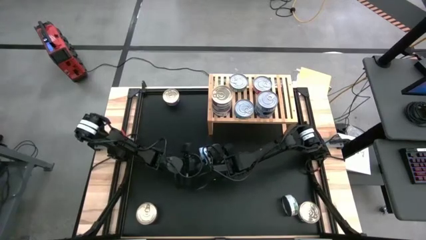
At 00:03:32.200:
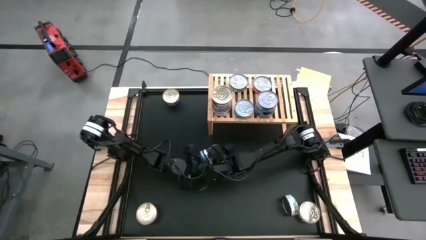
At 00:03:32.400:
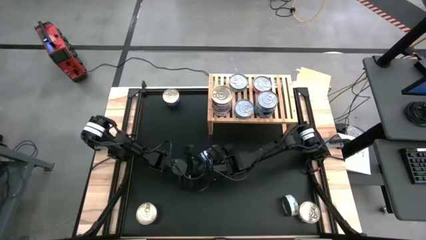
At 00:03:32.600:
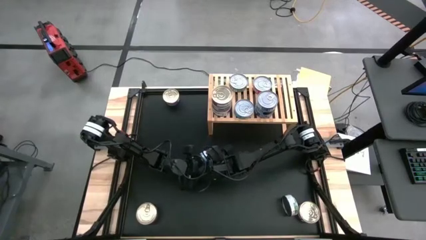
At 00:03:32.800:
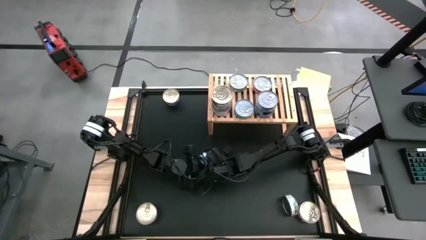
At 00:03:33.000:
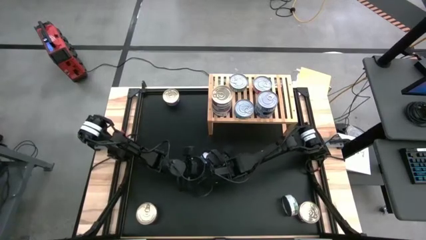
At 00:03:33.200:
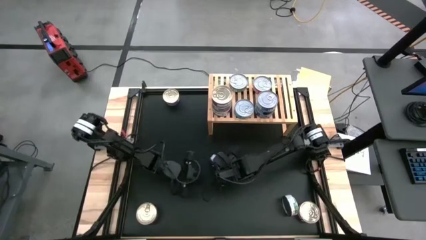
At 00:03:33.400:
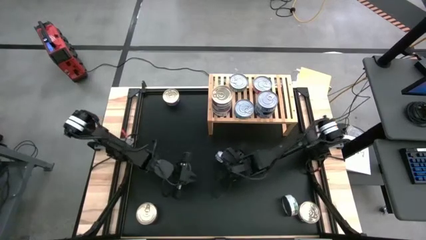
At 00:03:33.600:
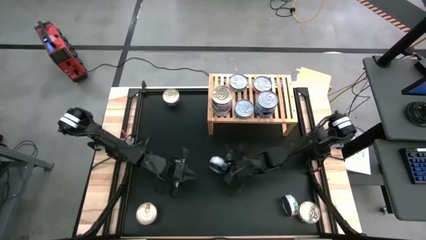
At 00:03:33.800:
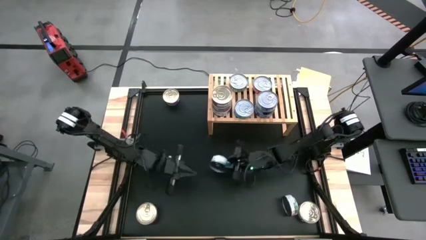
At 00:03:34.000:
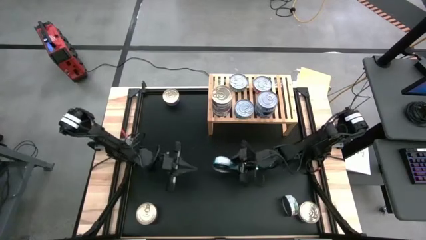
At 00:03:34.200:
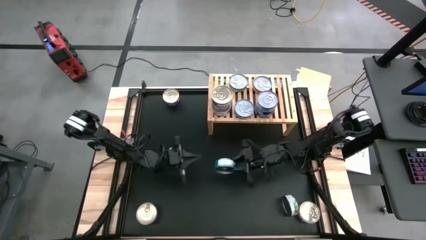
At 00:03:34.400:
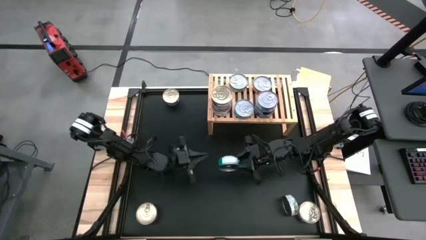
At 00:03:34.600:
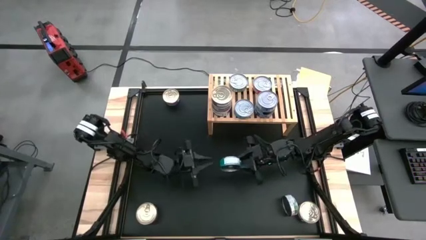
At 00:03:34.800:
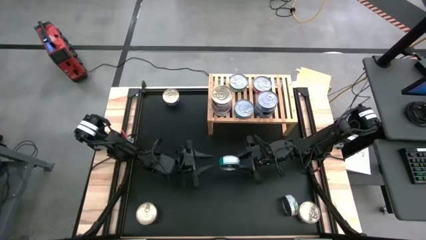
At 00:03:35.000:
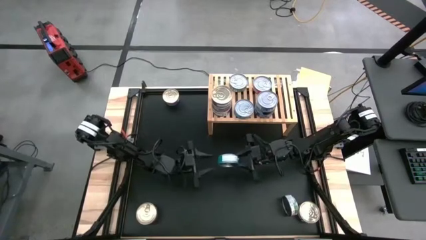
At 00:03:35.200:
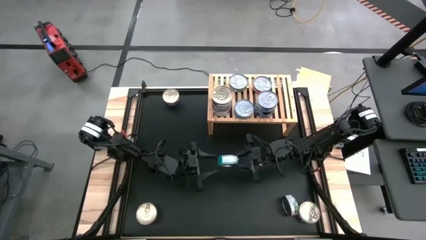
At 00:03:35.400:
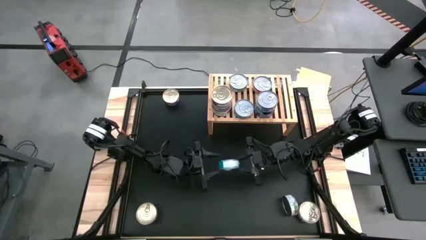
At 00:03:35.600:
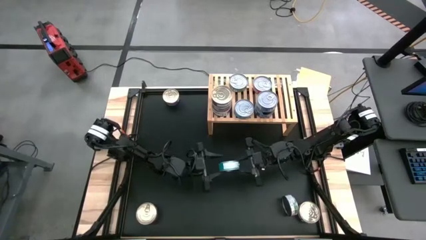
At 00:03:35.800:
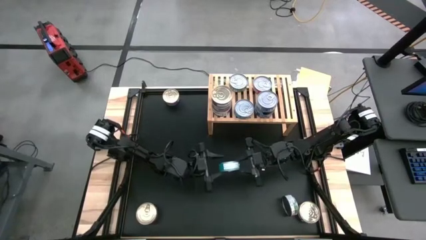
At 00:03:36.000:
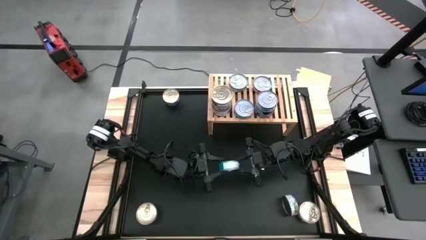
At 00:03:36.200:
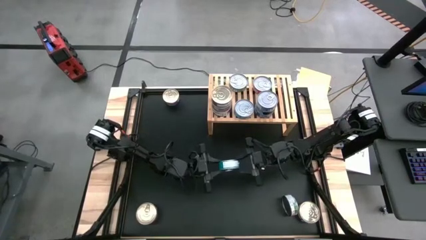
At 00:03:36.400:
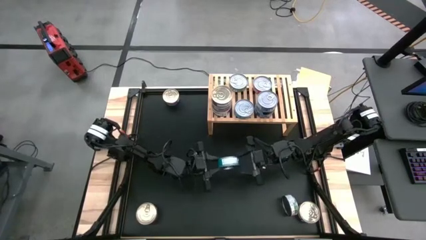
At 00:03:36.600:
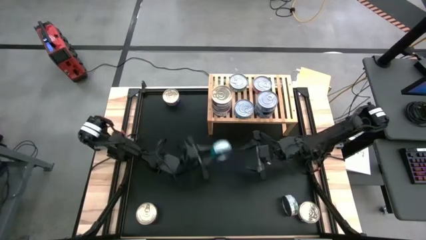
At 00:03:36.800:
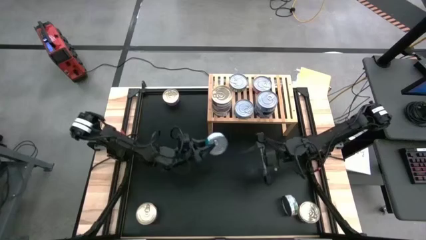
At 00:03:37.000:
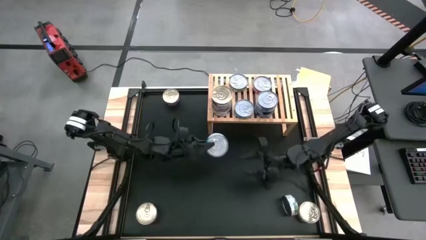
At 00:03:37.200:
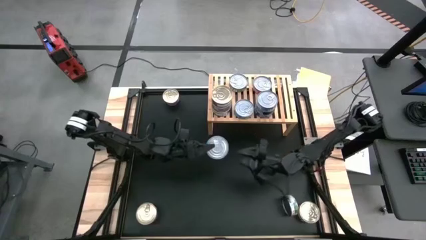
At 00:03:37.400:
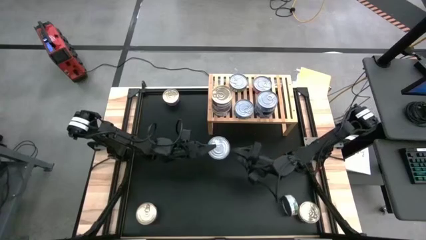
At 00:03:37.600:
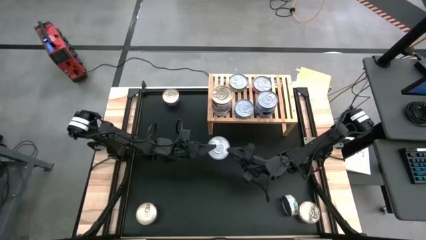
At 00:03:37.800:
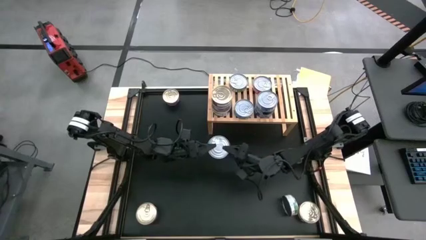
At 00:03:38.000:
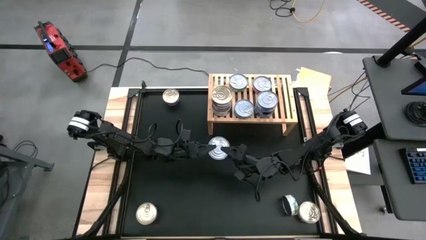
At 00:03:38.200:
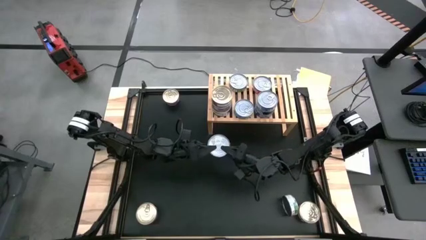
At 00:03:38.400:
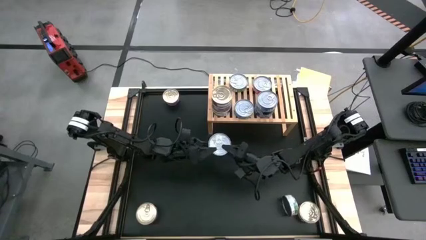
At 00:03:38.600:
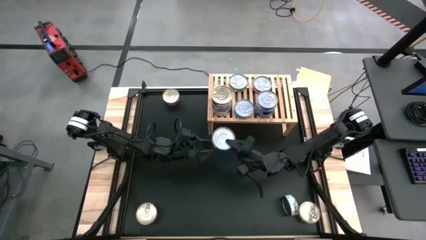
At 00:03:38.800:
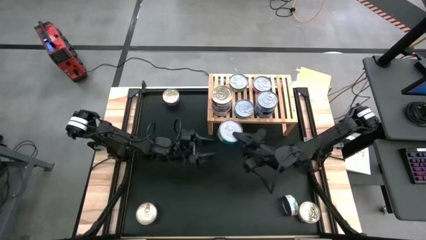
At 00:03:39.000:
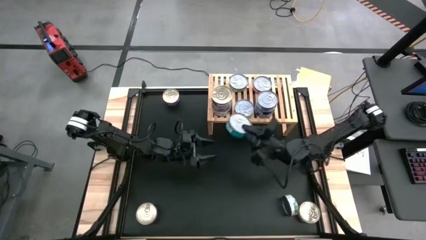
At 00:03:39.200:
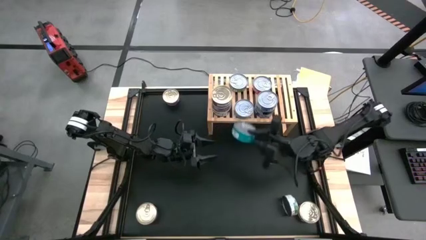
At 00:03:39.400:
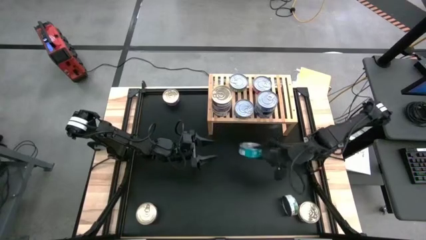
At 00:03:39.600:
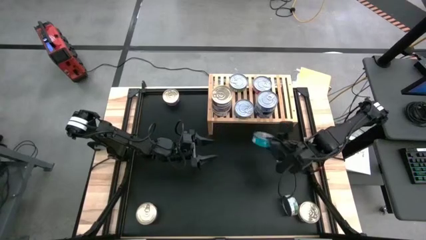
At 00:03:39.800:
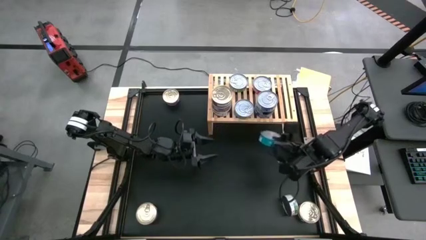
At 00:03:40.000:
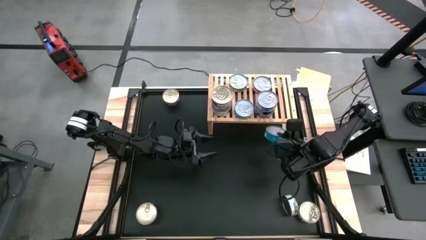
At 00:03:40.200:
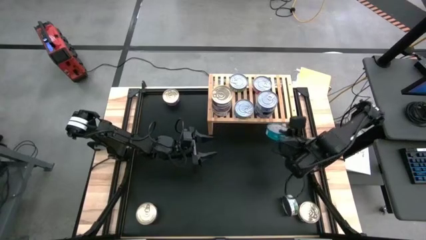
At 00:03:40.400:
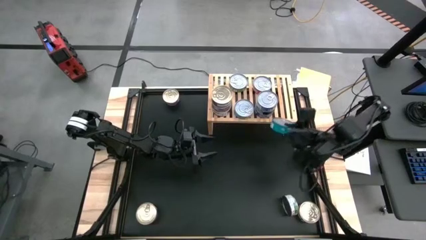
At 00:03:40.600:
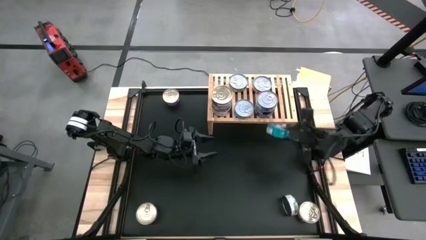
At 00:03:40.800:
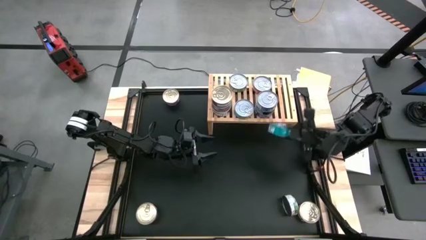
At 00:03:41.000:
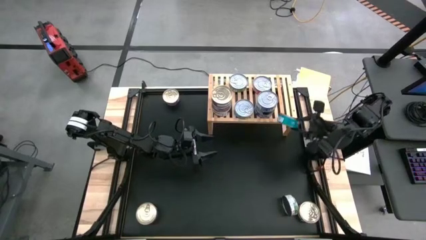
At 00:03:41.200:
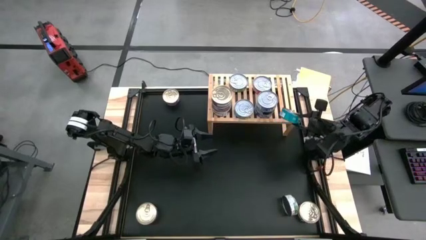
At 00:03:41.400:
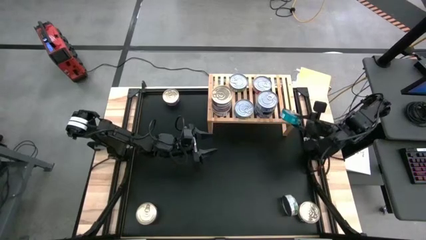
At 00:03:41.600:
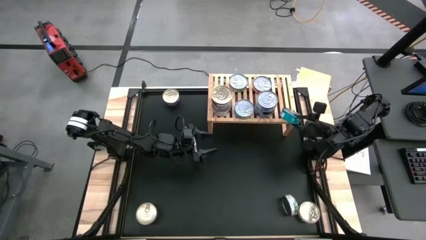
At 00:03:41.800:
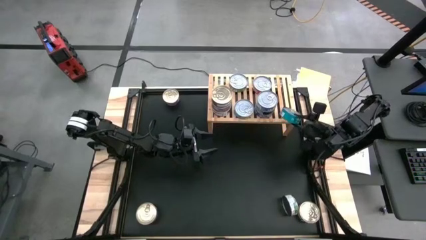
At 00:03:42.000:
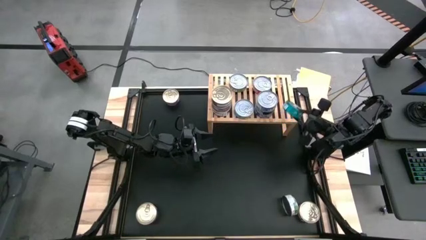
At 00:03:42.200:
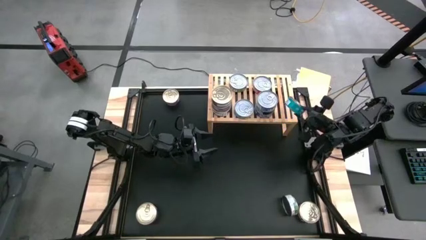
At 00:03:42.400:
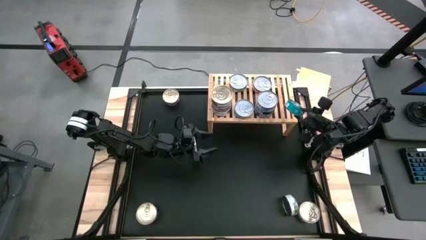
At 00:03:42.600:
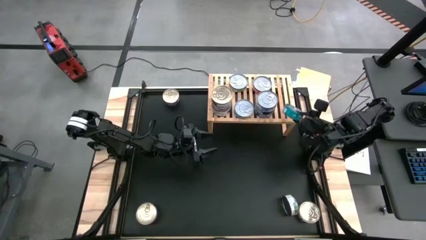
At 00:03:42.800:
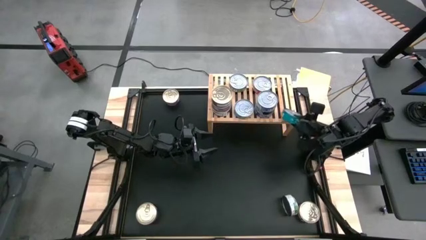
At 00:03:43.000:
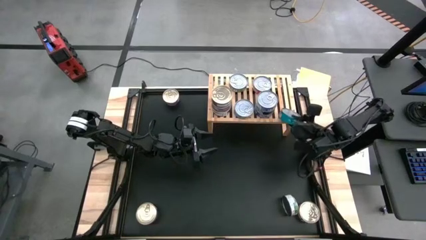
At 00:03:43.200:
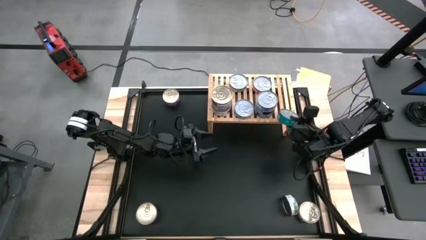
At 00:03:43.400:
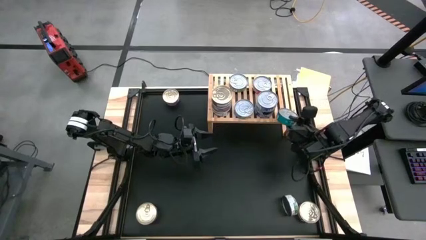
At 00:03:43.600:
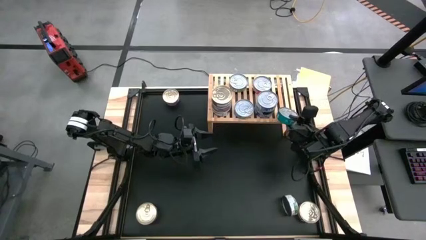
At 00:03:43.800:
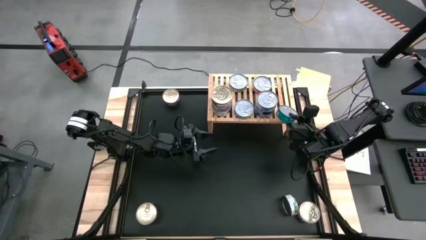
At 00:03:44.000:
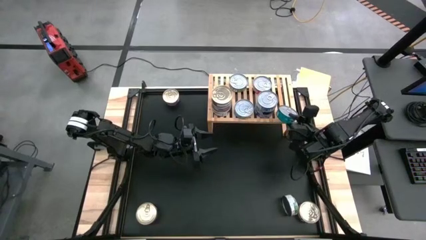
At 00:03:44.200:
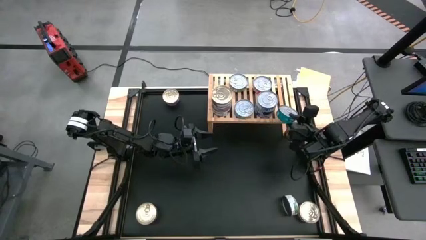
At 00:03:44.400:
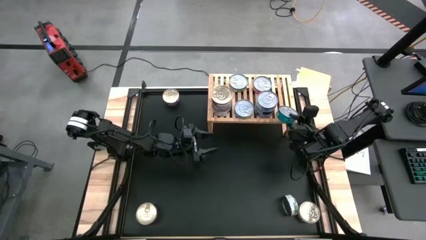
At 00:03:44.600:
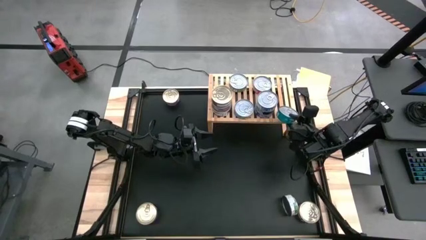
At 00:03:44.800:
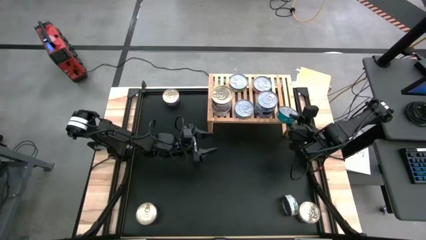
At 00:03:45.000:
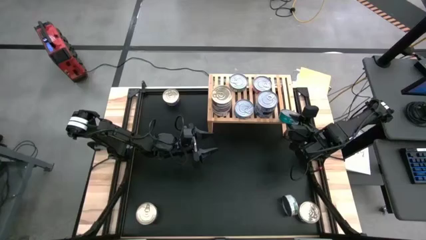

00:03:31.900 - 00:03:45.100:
Task: Stack canned seafood by type on shelf
Put the green blue tuna can on the shelf
